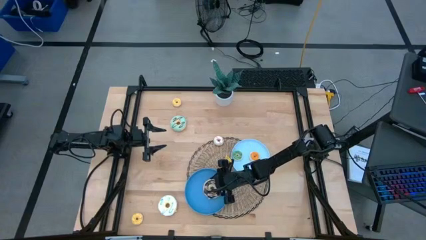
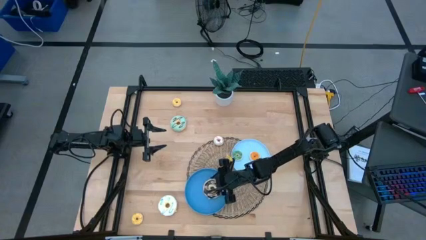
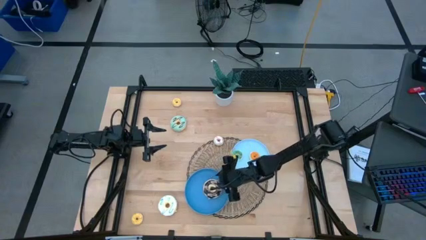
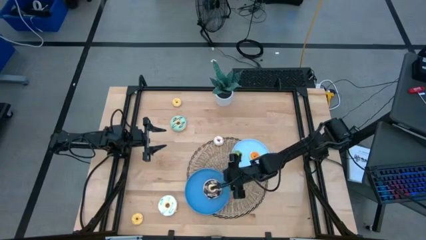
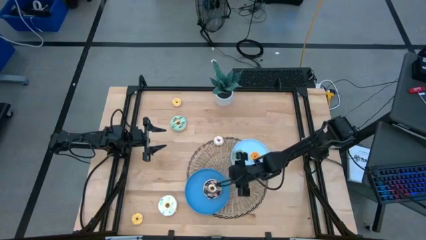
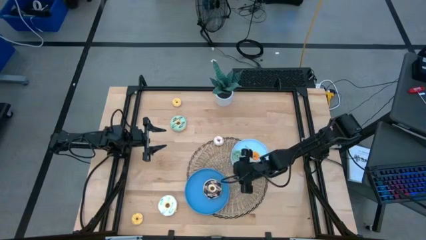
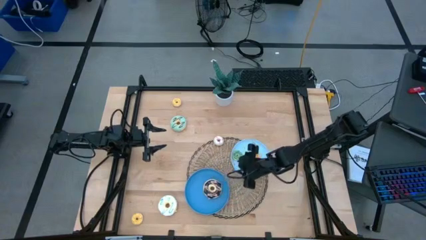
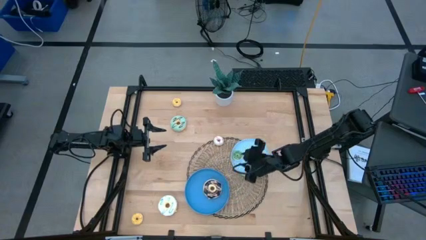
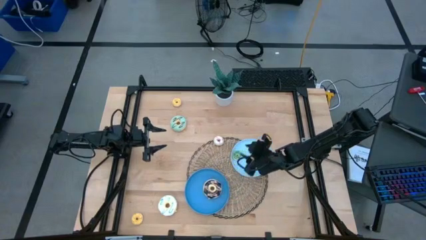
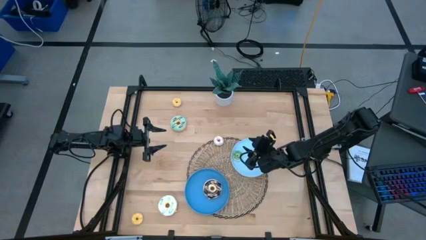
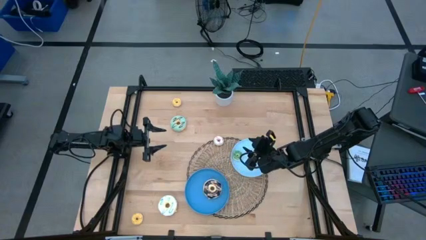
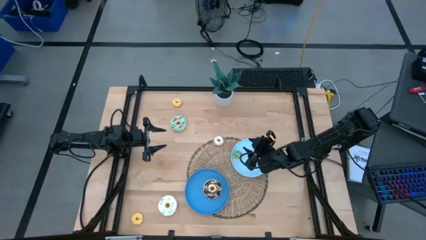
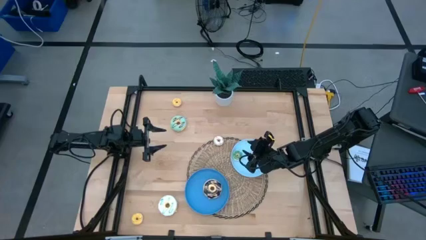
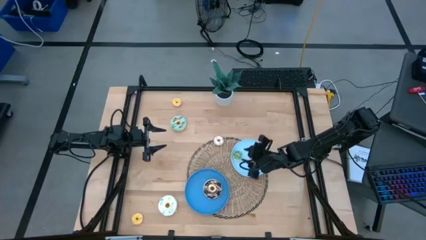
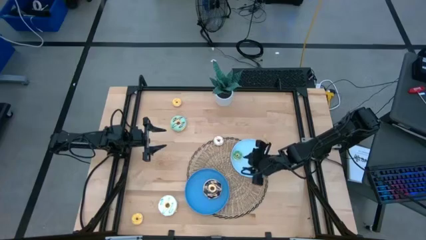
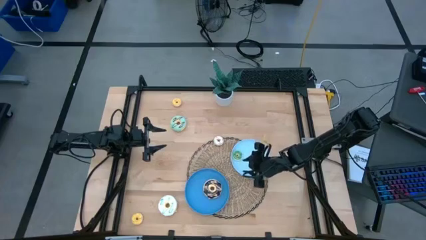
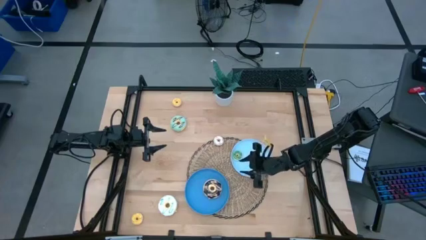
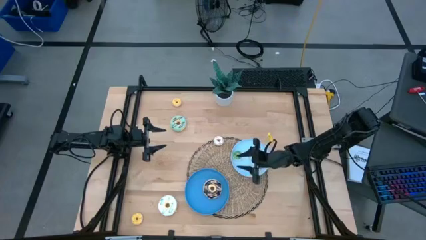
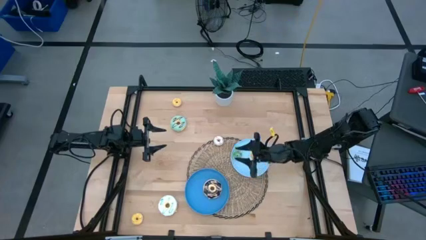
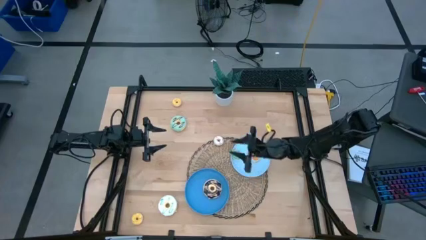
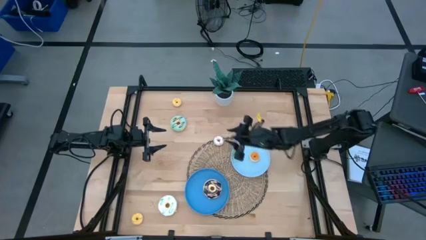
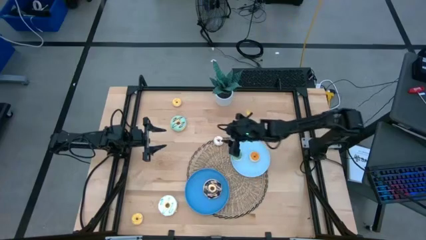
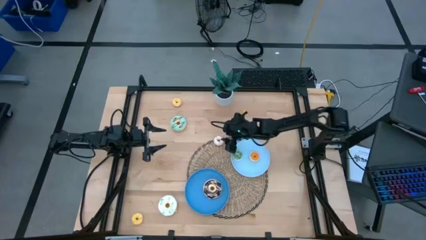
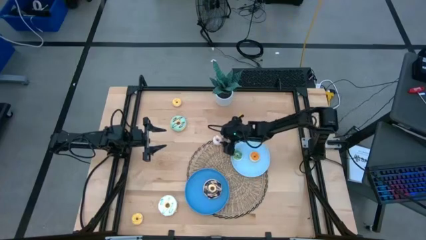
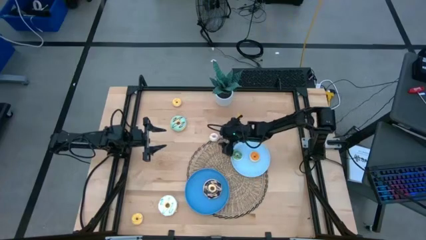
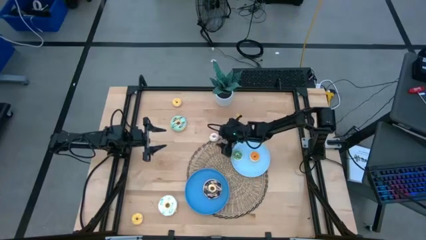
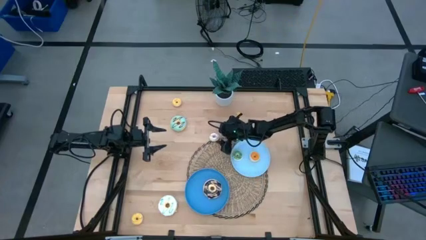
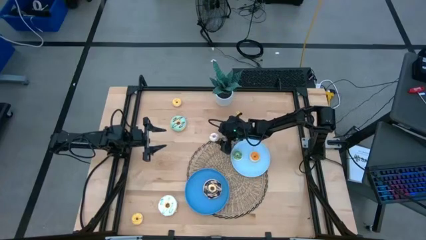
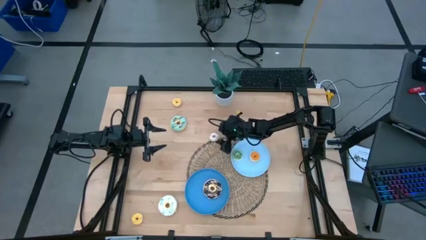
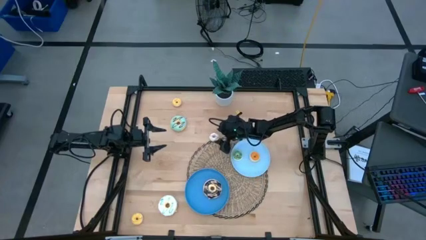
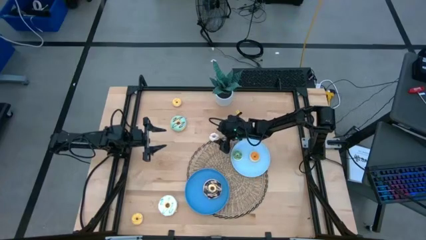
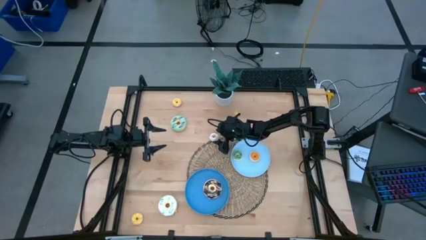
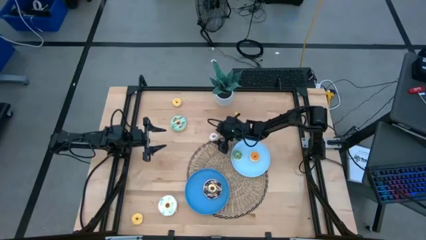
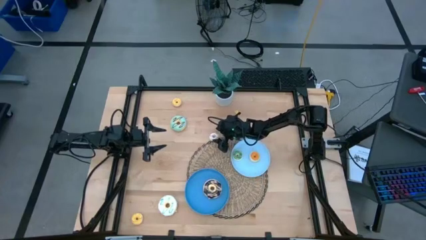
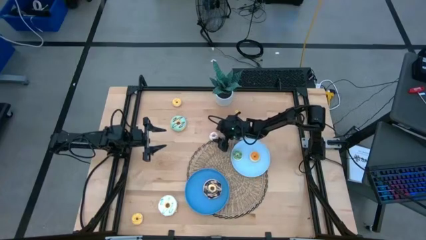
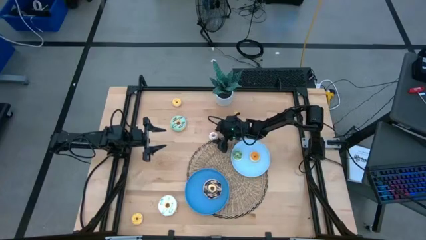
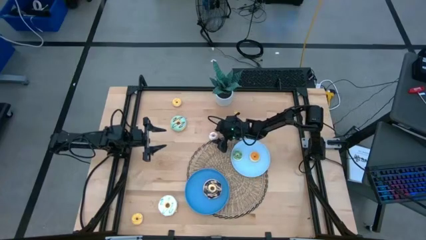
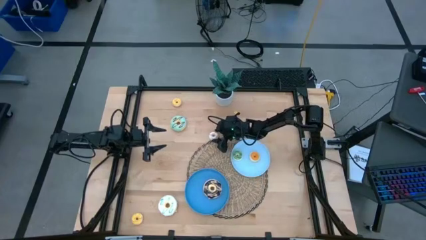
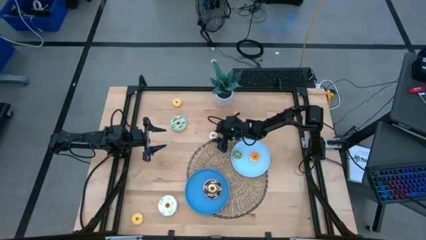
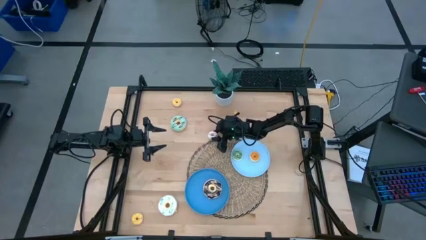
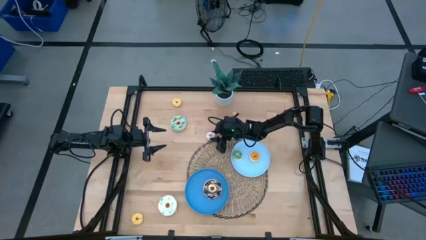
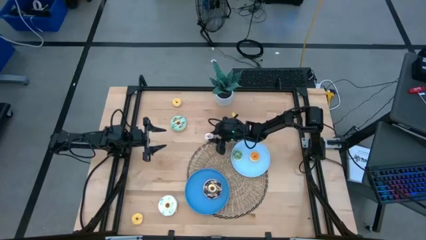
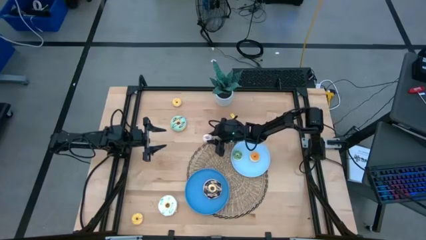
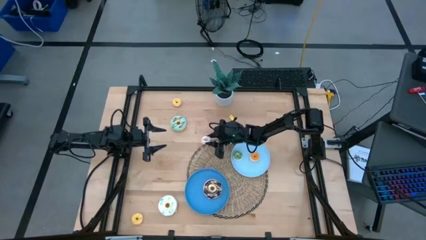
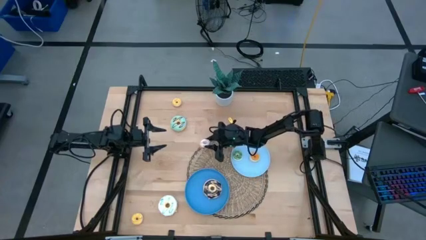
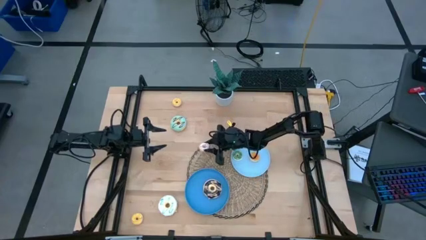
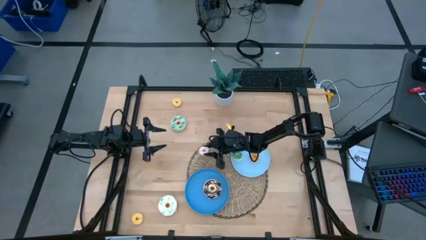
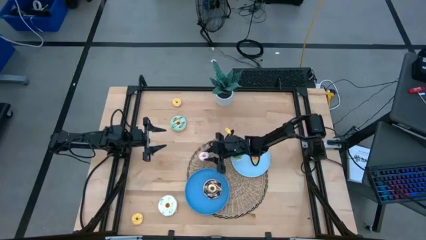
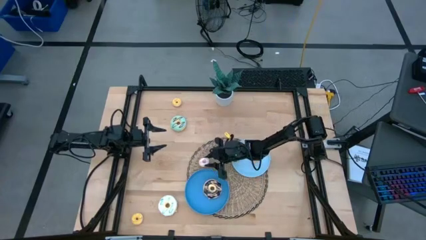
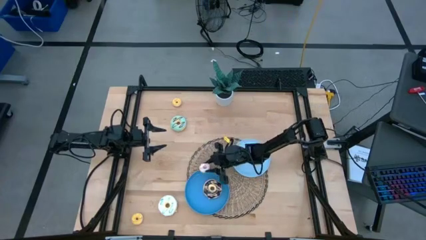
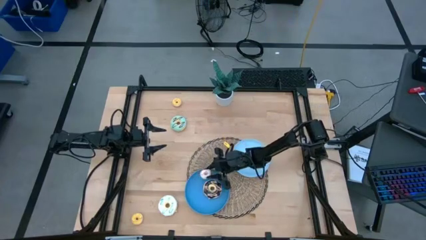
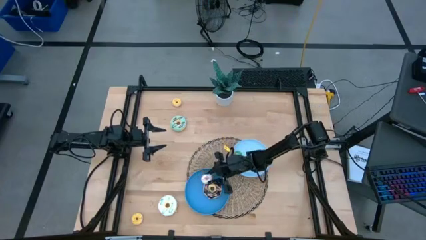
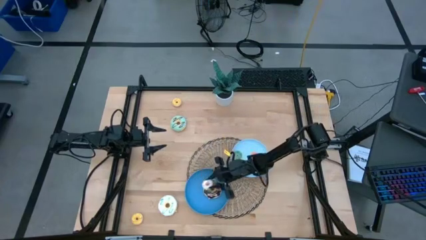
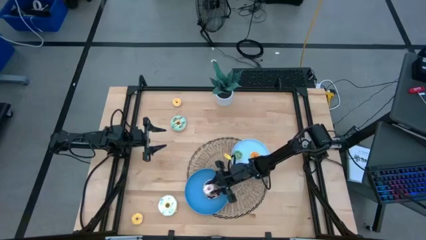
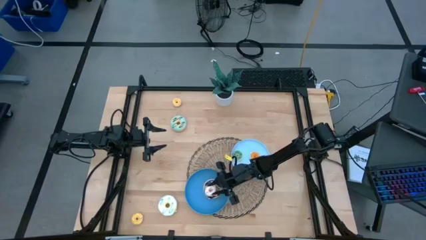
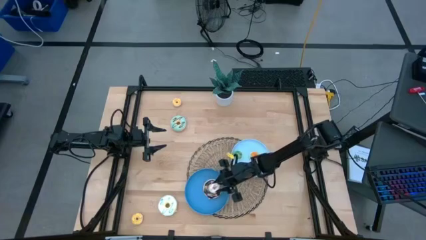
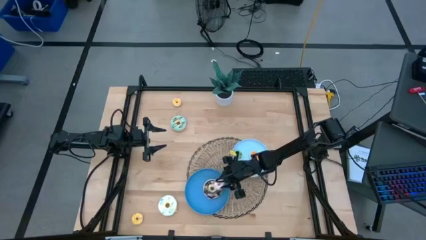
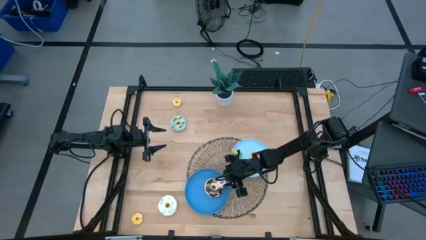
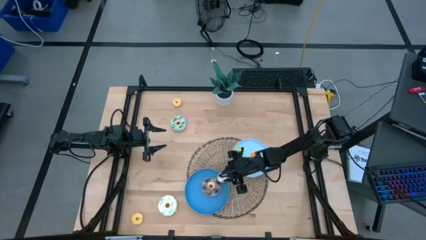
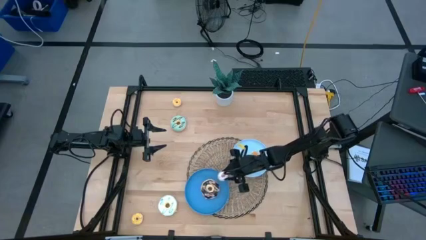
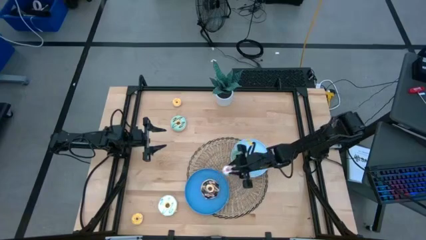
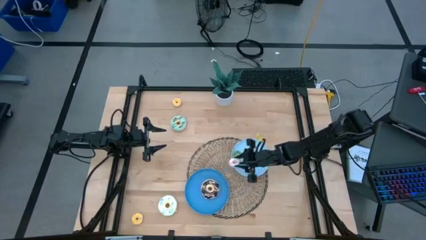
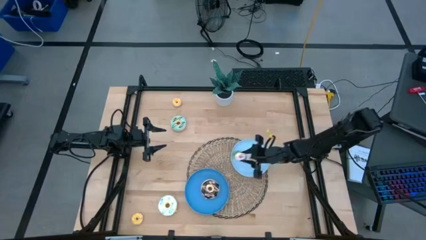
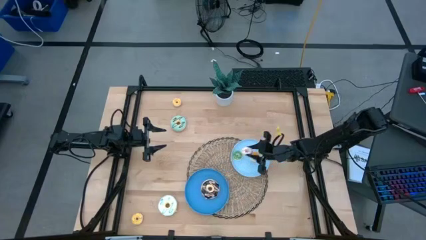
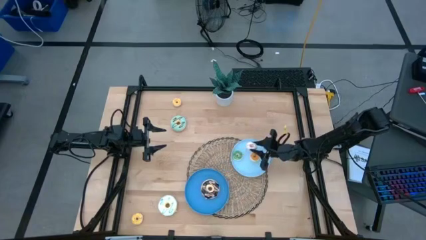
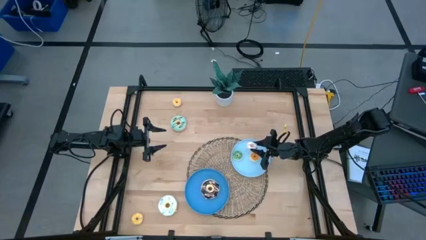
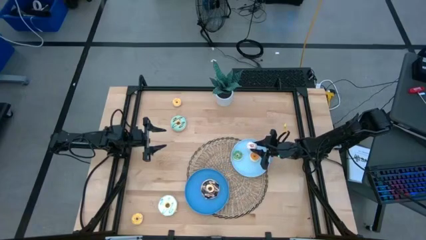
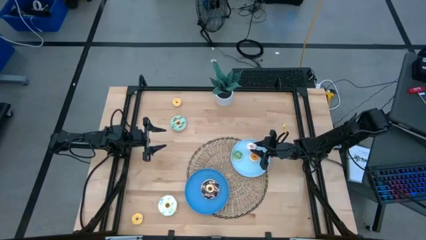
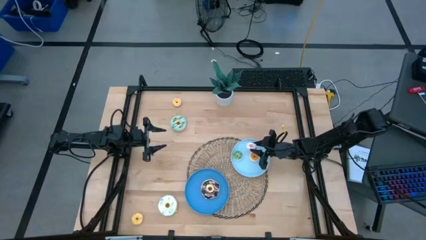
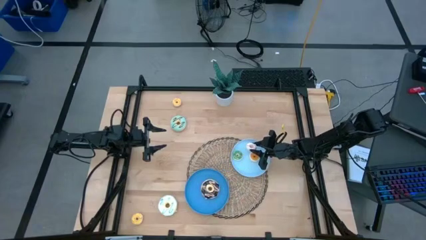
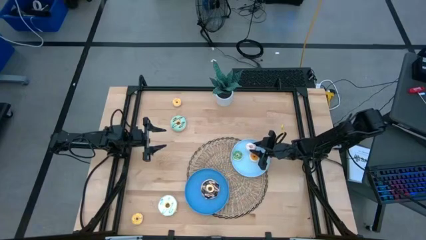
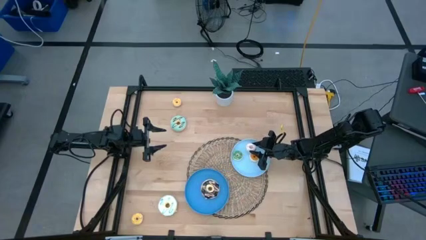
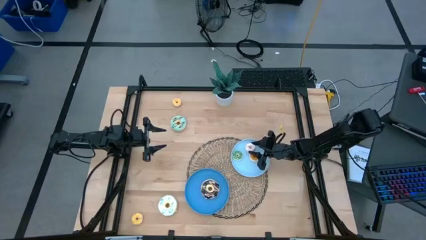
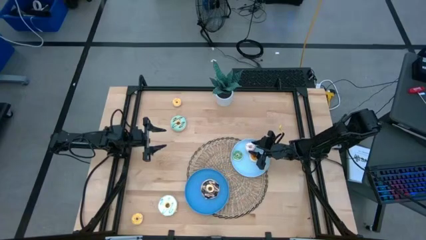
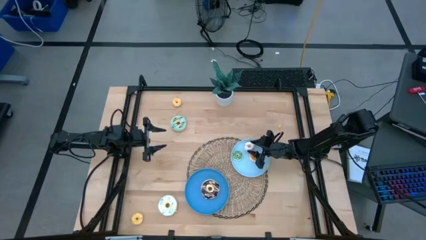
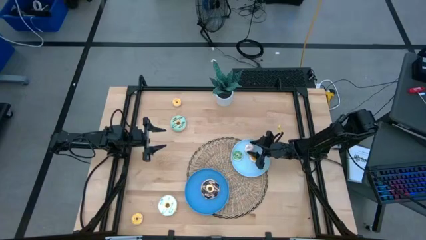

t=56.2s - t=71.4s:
Task: Pick & Place donuts
Put the small white donut on the light blue plate
